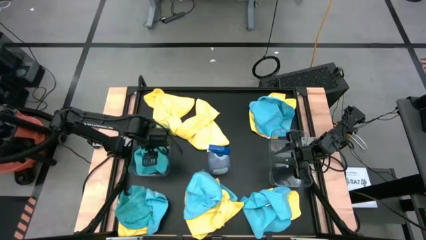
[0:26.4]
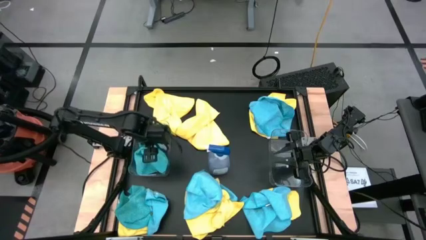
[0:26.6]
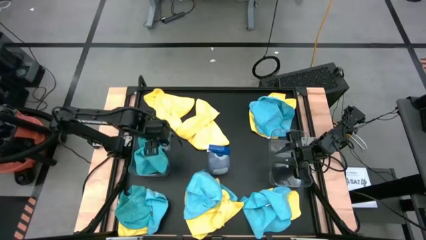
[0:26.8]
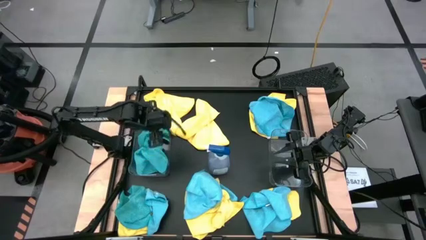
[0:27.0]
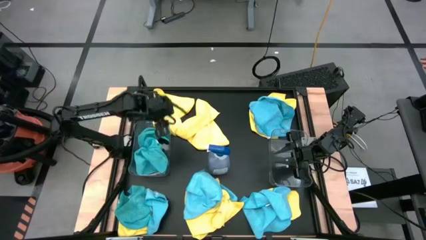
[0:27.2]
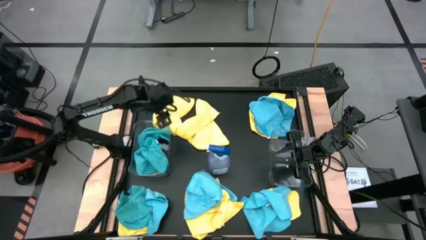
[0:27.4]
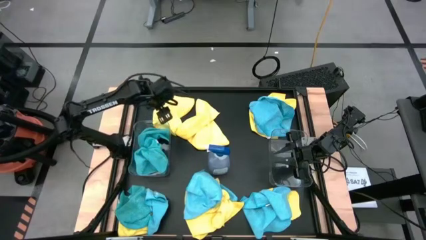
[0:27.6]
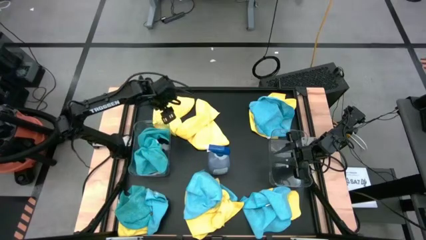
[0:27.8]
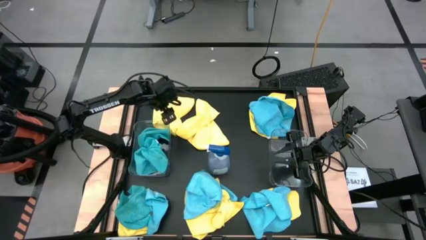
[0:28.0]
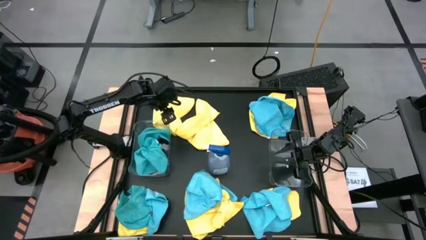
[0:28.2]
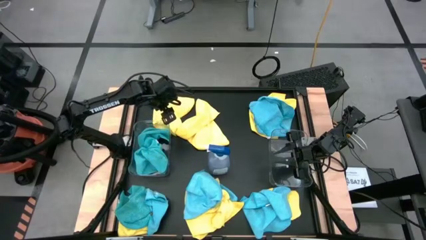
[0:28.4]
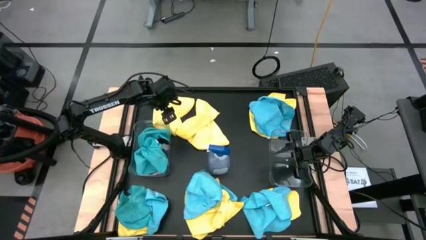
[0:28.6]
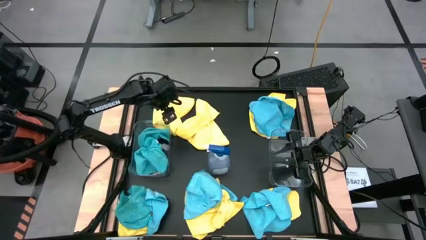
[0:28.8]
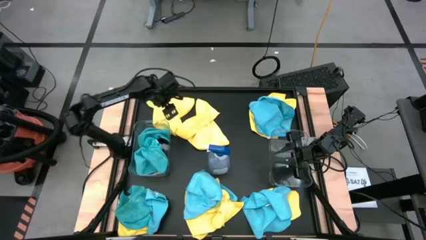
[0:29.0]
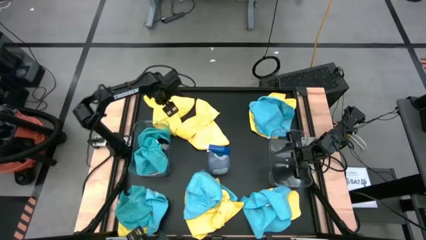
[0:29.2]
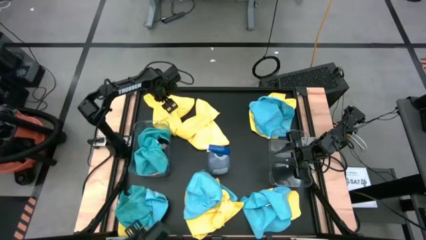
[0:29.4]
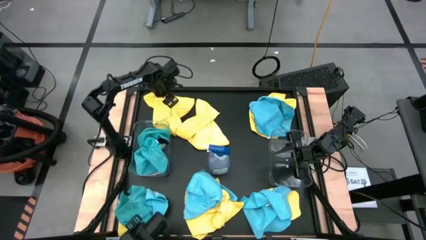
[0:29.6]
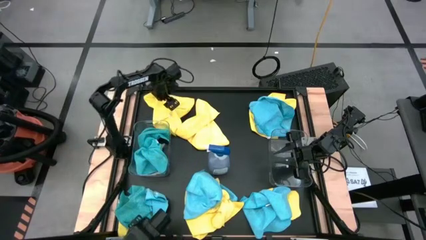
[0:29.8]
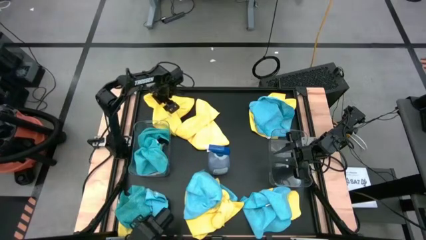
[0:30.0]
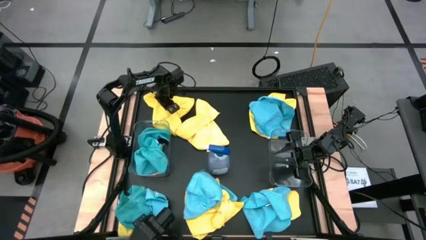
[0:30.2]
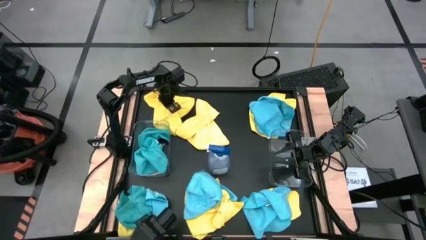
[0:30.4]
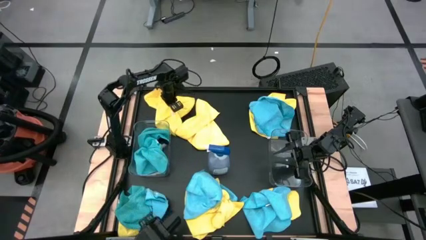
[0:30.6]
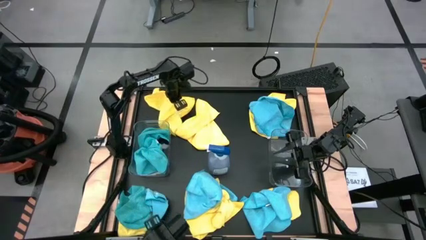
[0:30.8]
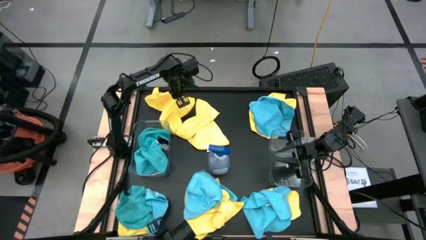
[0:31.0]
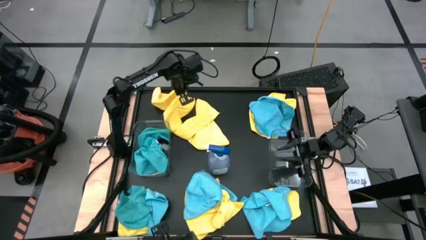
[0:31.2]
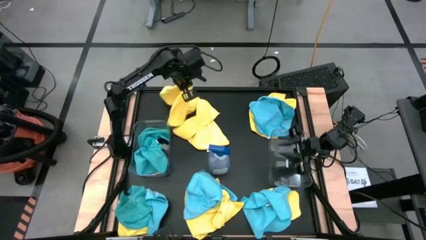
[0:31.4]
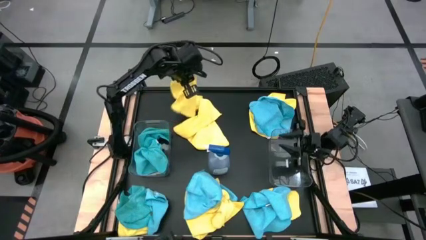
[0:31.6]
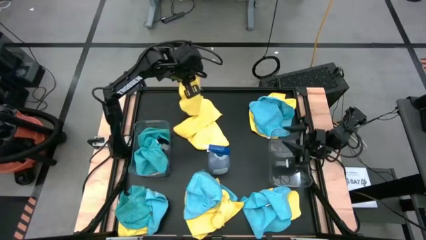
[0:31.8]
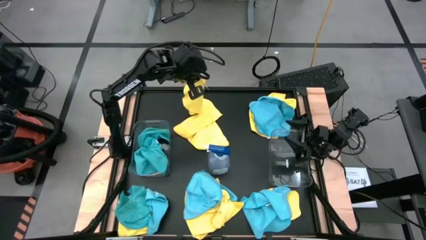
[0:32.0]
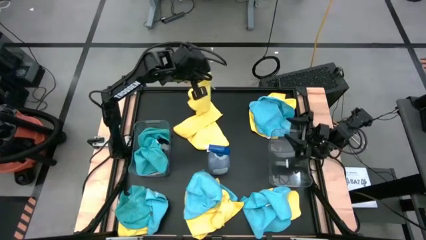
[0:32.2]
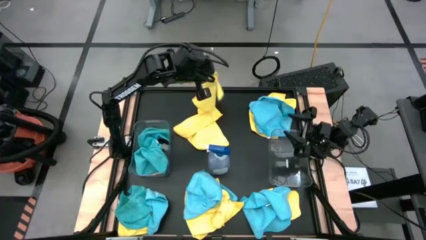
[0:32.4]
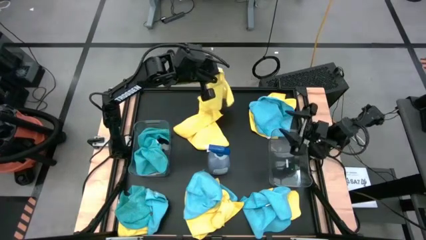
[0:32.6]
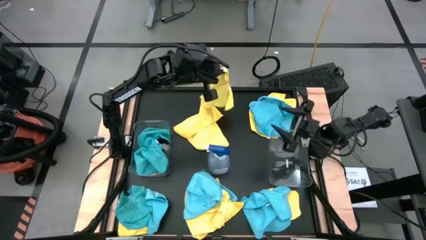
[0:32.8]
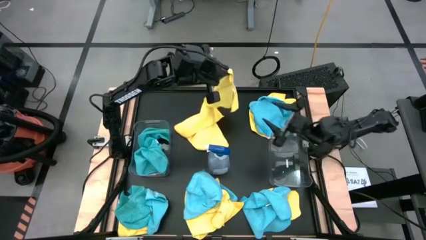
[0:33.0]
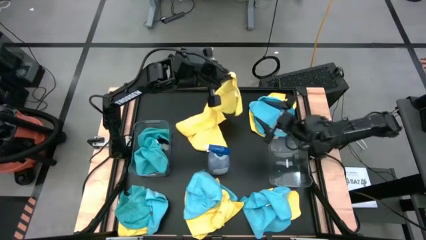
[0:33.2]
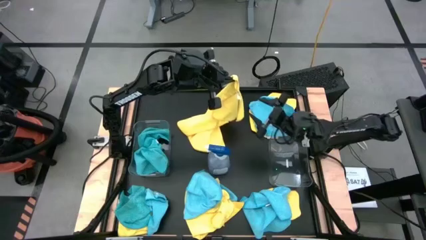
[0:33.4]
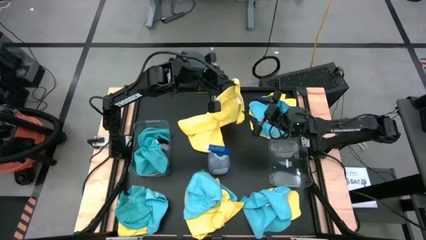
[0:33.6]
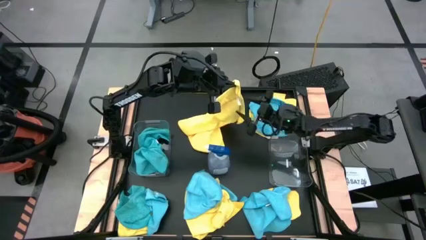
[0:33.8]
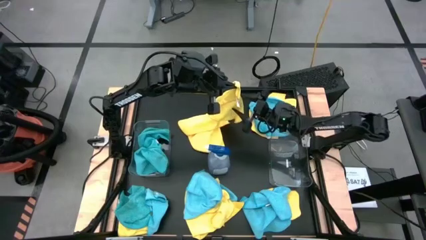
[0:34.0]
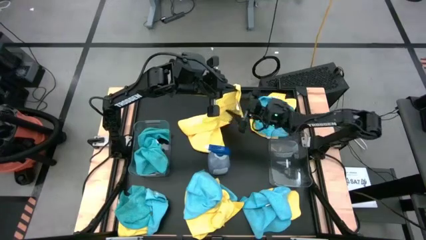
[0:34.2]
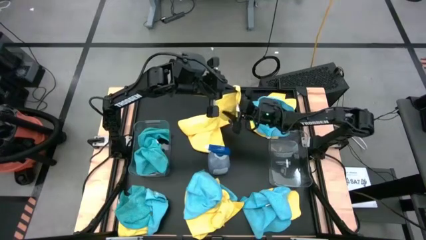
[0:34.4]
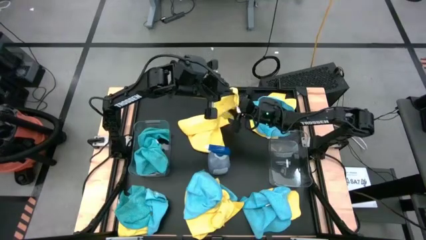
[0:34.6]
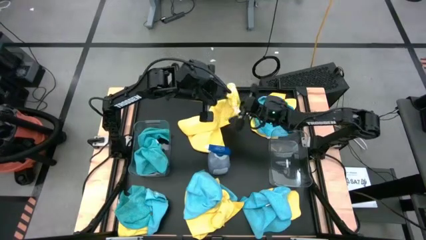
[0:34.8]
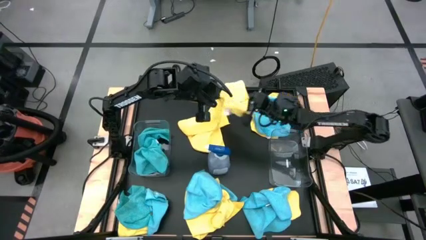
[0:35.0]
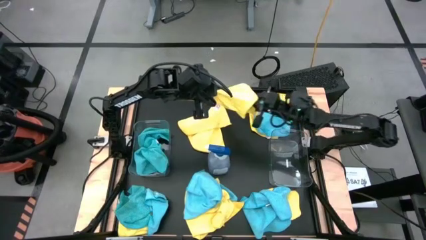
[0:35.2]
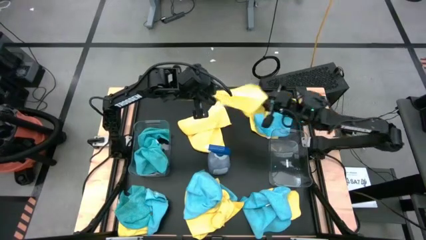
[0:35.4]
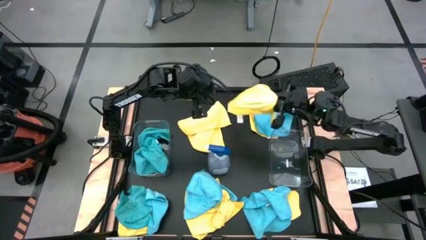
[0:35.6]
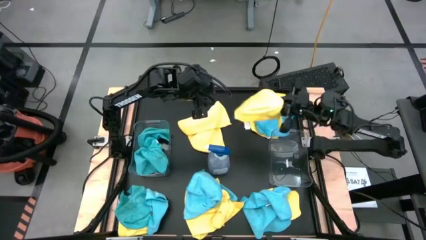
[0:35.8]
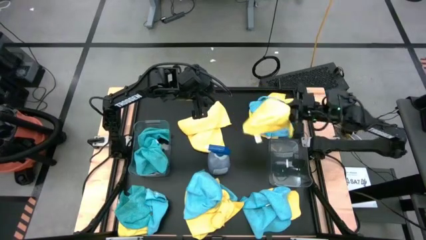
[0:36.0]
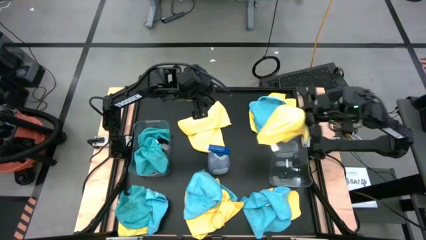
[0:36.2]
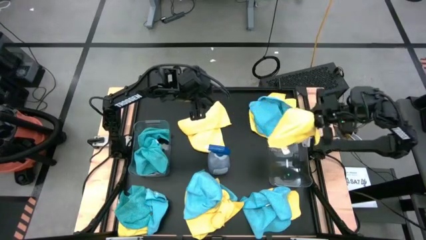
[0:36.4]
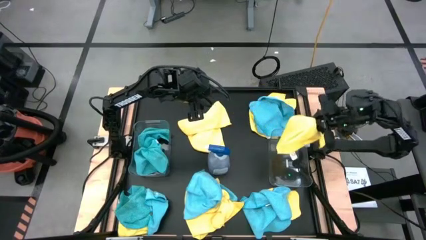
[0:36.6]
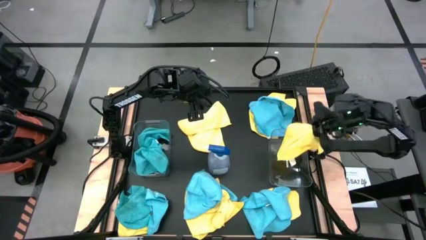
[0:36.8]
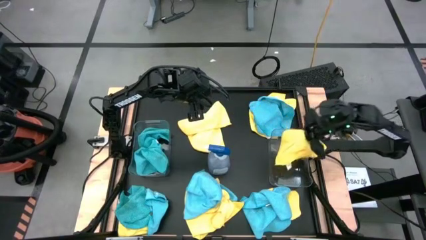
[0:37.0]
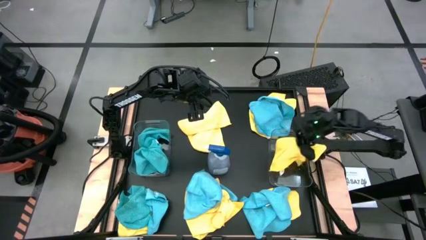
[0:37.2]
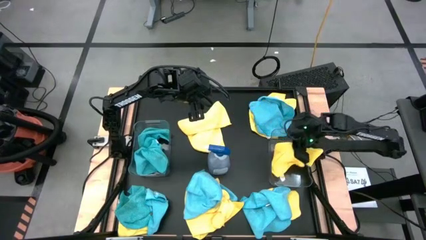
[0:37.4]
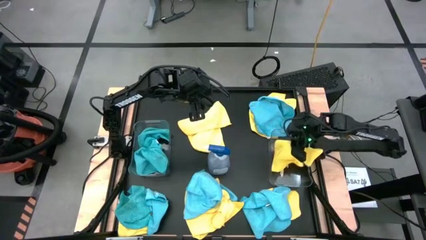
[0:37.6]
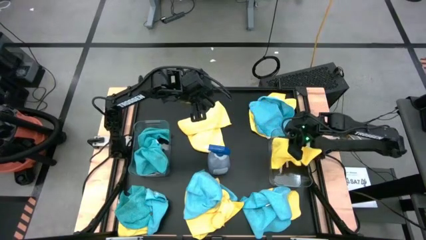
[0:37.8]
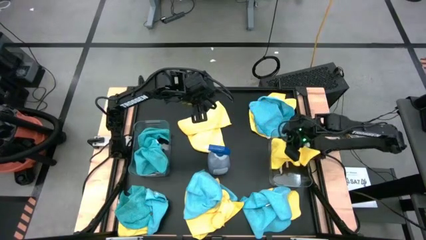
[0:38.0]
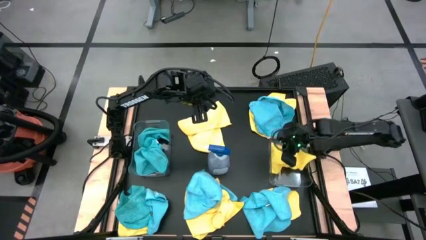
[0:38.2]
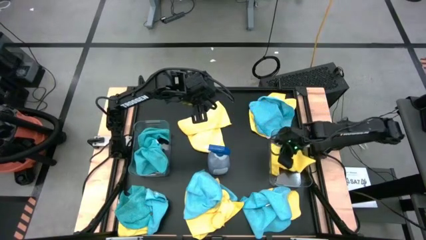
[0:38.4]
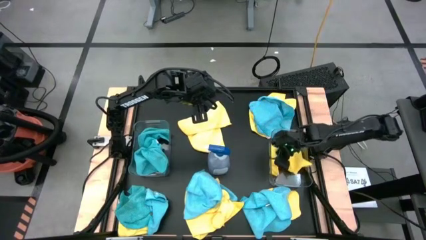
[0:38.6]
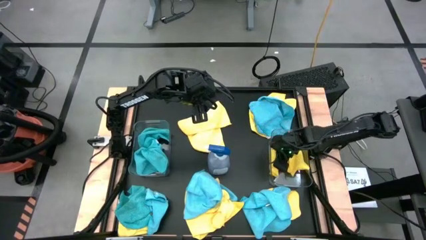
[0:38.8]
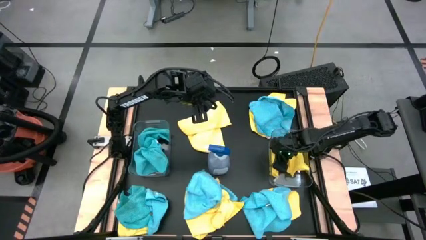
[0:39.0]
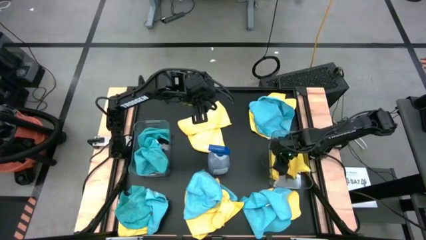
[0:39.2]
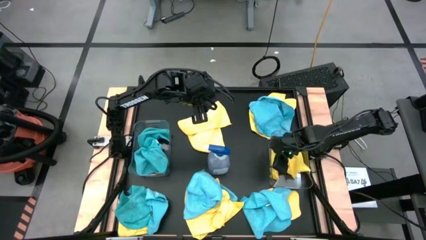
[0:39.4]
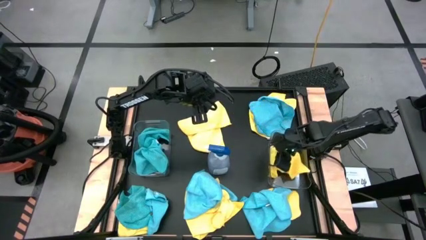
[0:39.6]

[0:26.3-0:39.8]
Task: Sort microfiber towel by color & place in baskets
Put the yellow microfiber cloth into the right transparent bin

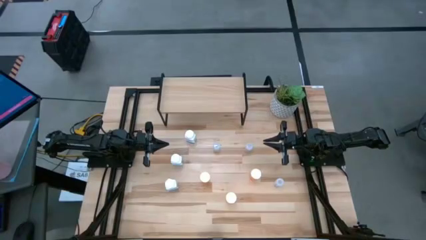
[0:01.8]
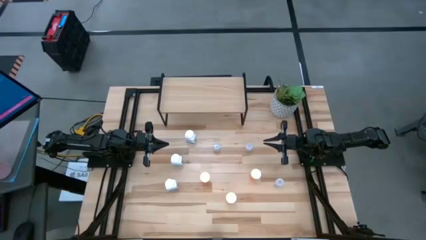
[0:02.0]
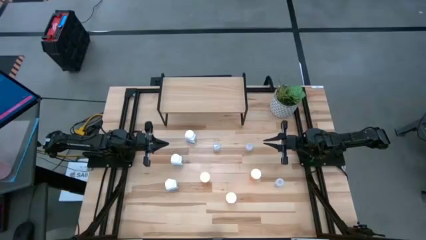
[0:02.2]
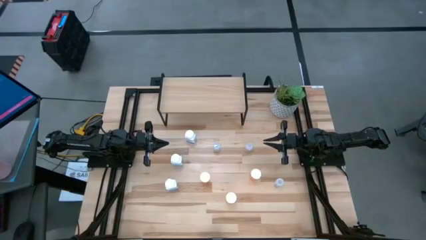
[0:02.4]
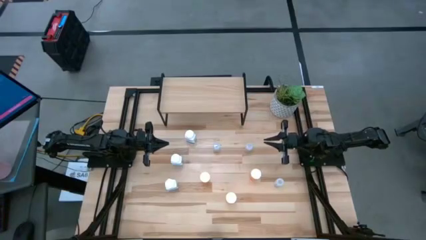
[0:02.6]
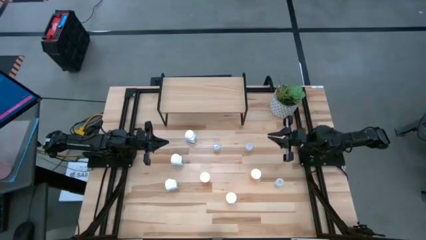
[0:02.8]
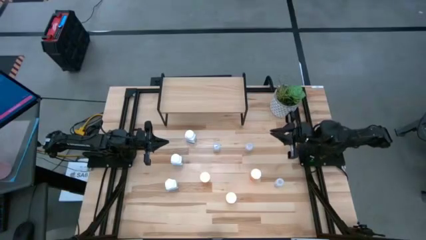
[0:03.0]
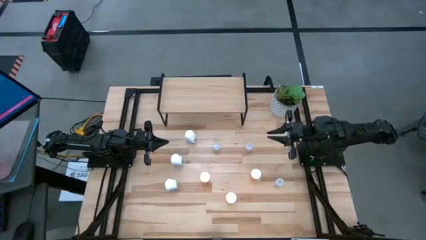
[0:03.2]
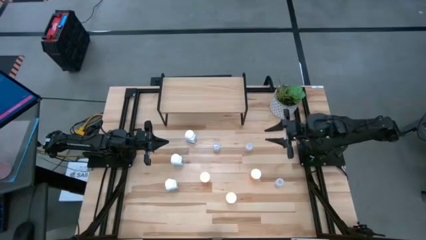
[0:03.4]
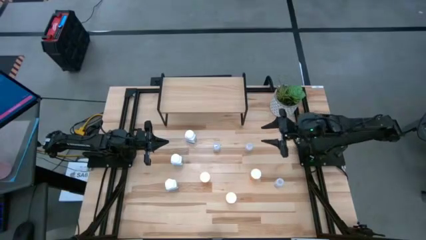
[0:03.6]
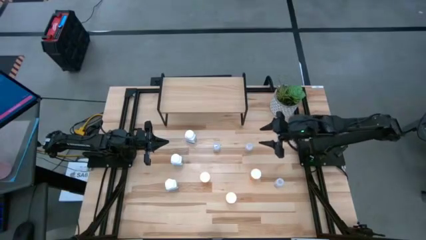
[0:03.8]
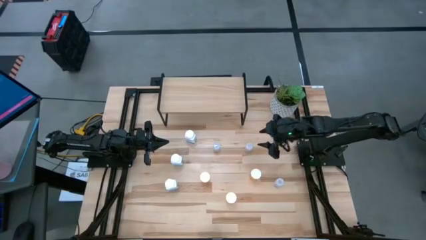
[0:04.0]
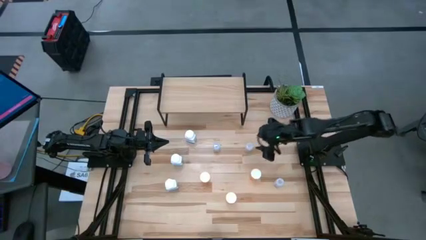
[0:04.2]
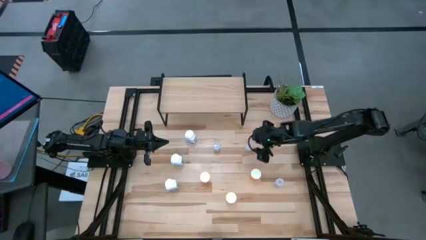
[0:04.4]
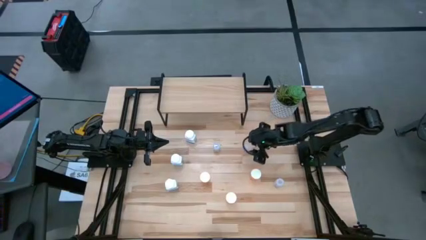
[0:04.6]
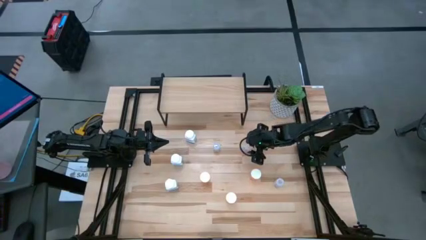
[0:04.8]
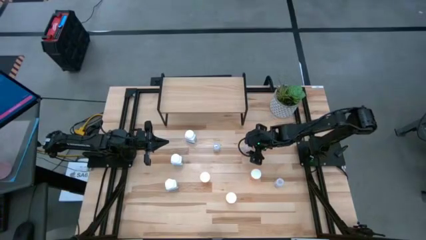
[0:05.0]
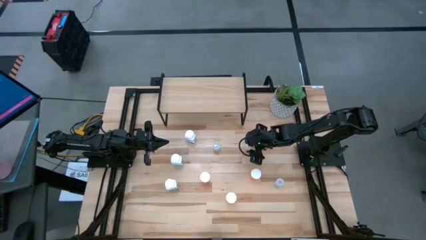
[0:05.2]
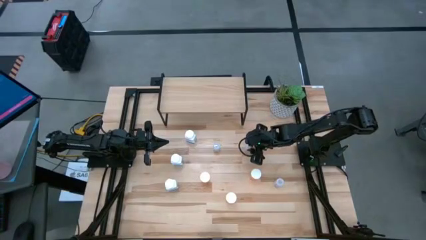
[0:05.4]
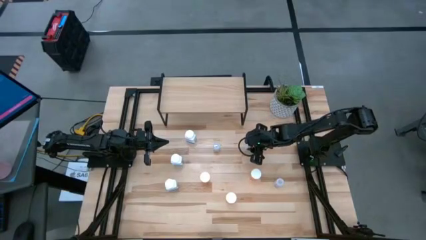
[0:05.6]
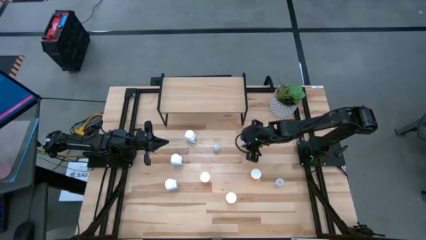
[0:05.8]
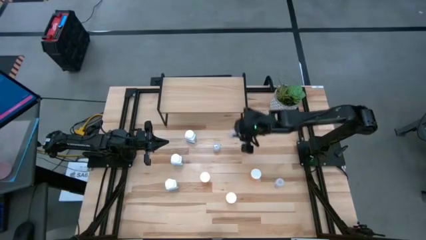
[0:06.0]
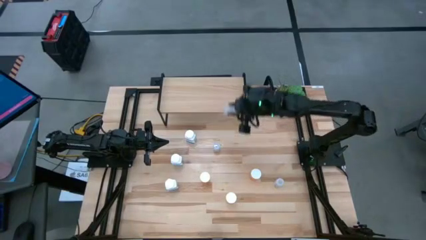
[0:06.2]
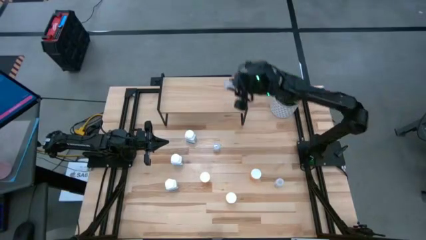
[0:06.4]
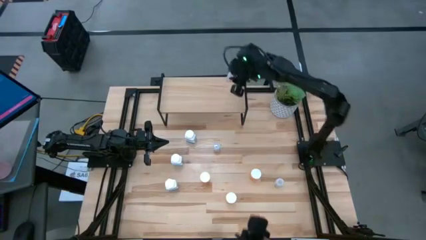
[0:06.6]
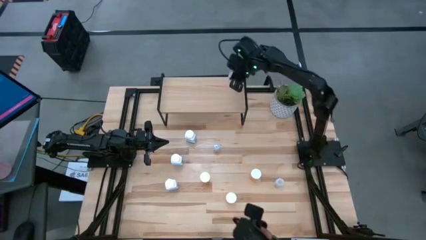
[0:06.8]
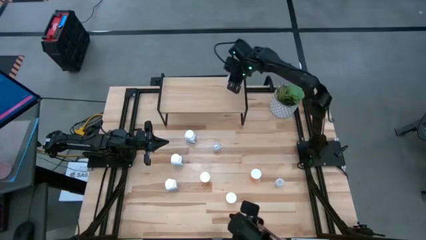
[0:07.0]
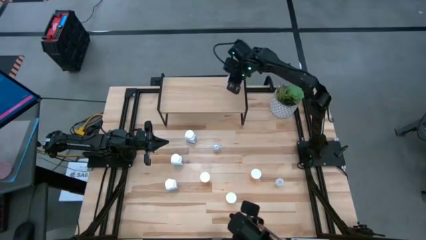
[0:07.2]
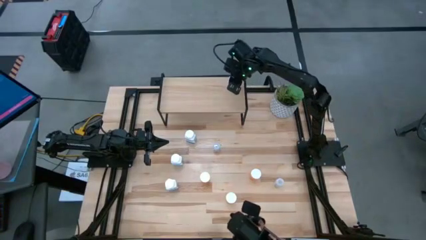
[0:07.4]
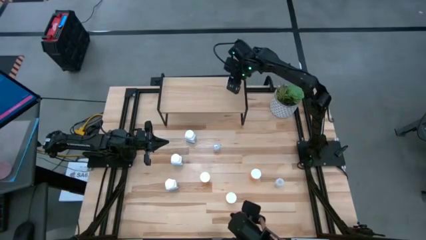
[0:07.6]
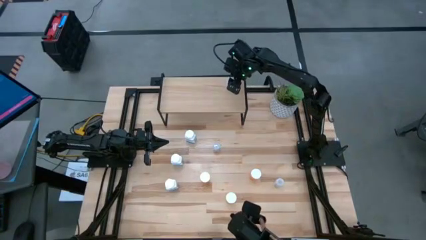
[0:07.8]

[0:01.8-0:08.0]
Task: Pick and place medicine bottles onto shelf by color
Put the top right transparent pill bottle on the shelf
